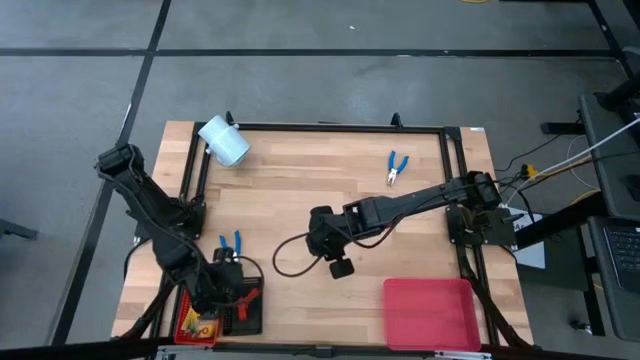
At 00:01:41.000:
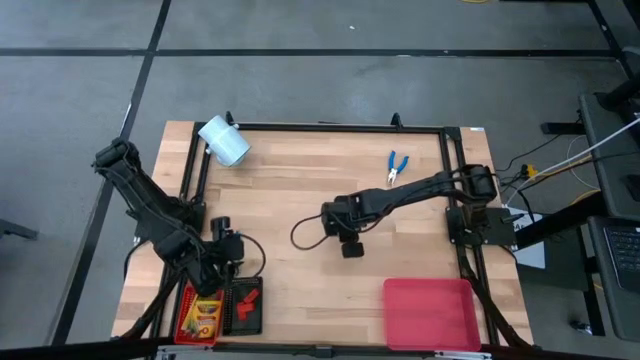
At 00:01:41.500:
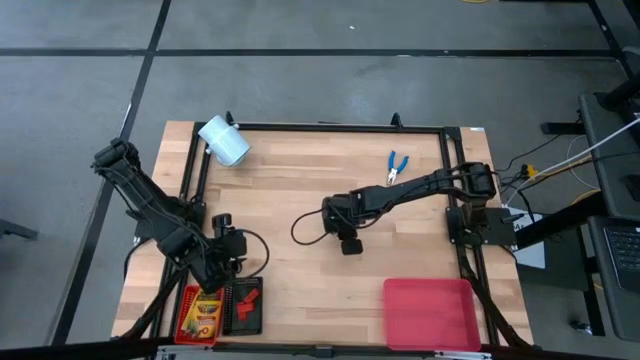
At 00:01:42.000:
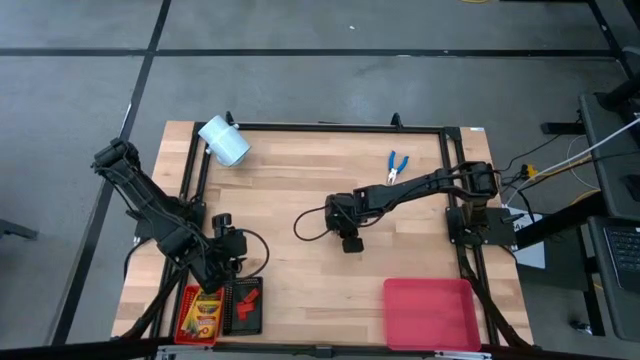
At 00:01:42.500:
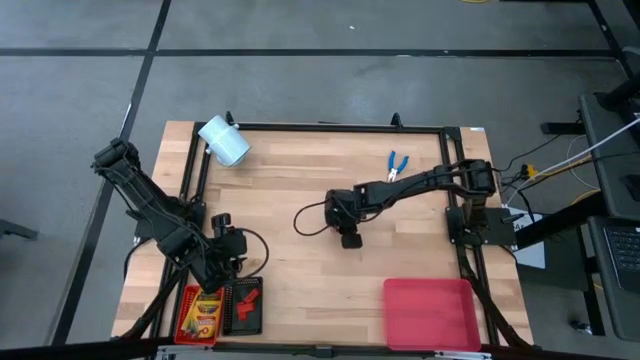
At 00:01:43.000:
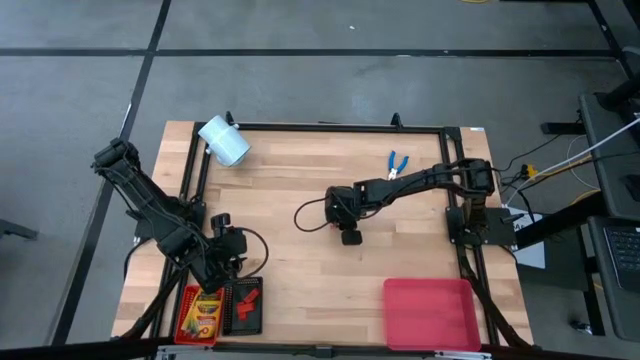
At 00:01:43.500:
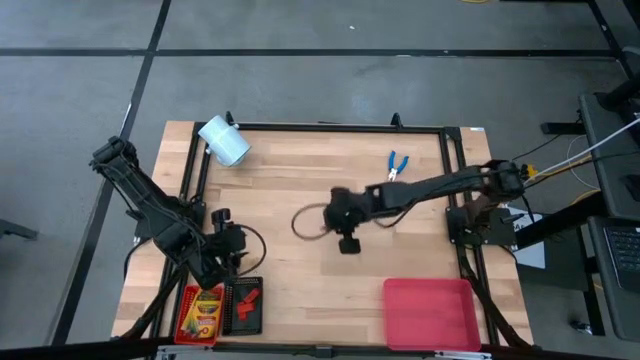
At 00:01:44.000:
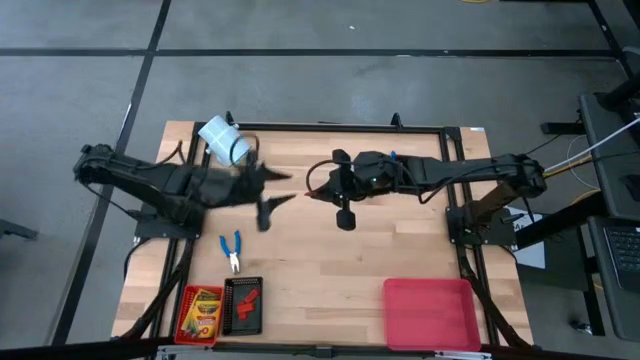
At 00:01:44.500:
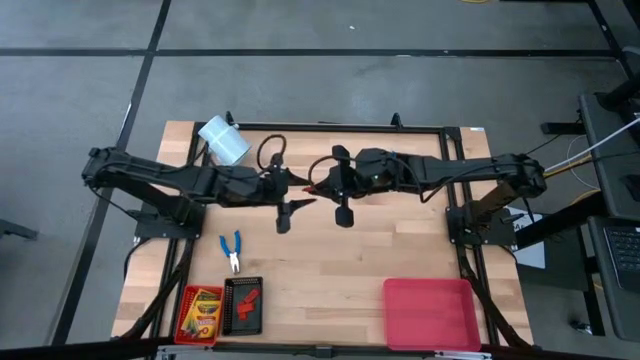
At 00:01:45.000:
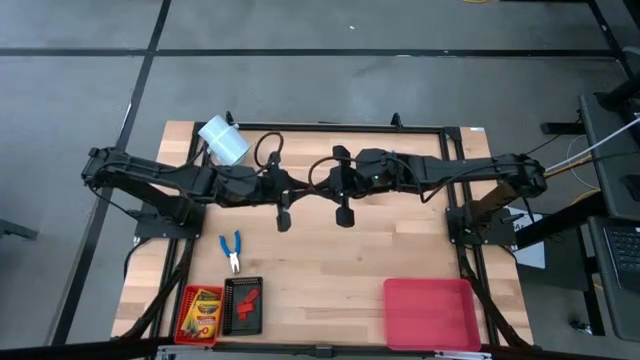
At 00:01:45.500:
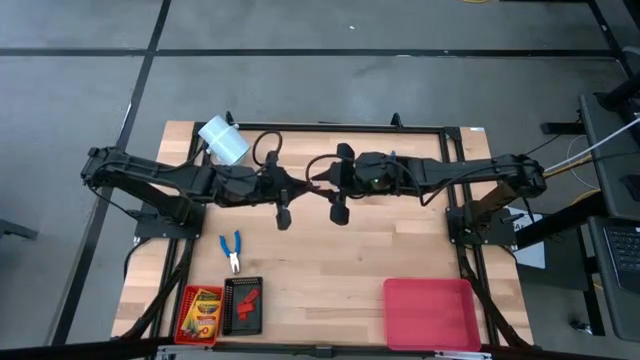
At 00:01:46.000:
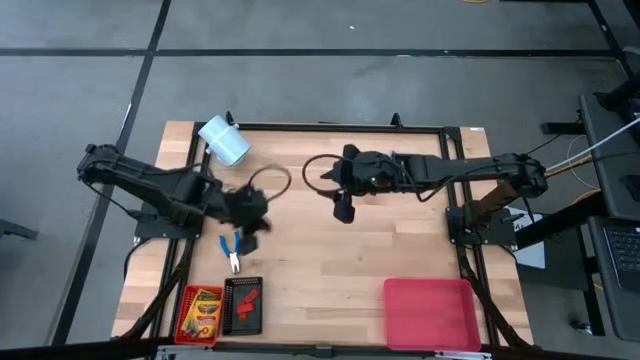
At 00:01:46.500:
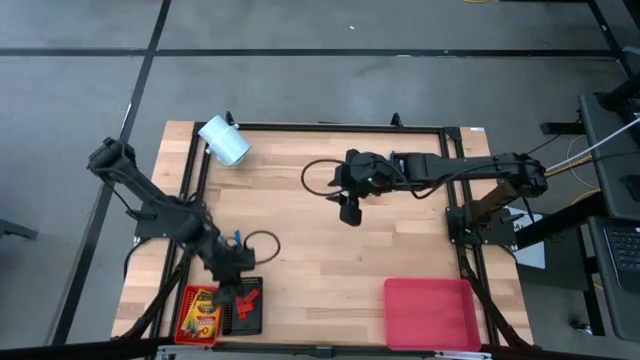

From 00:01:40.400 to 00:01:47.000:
Task: Pick & Place School Supplies
Put the red eraser into the black basket

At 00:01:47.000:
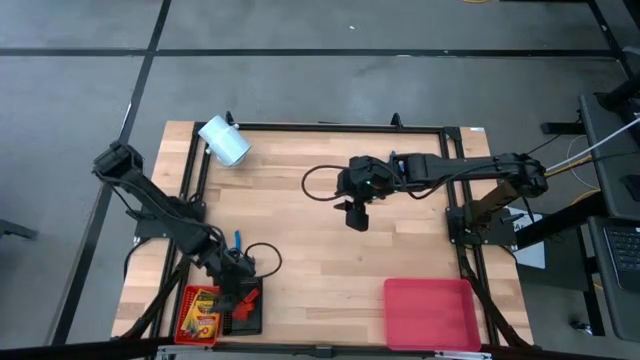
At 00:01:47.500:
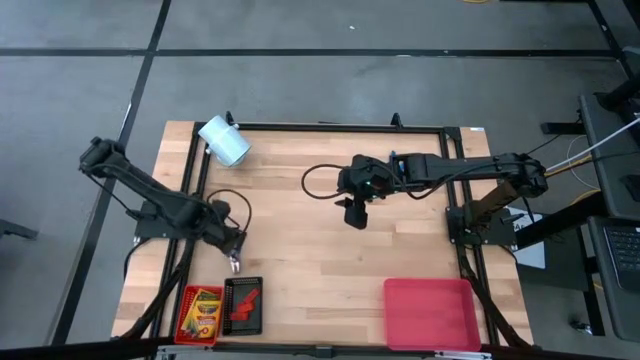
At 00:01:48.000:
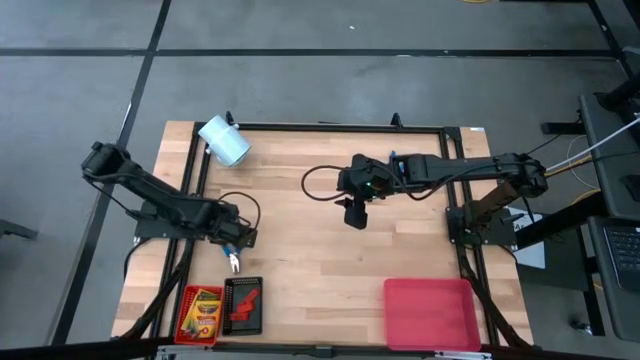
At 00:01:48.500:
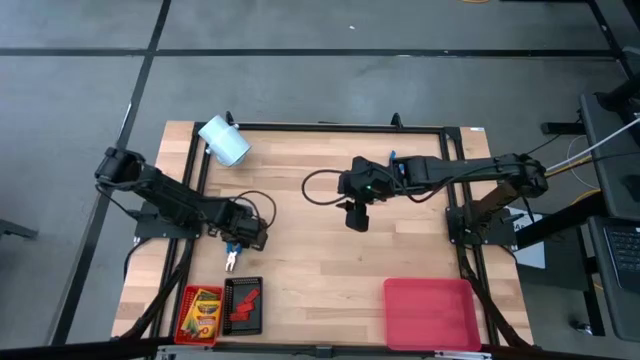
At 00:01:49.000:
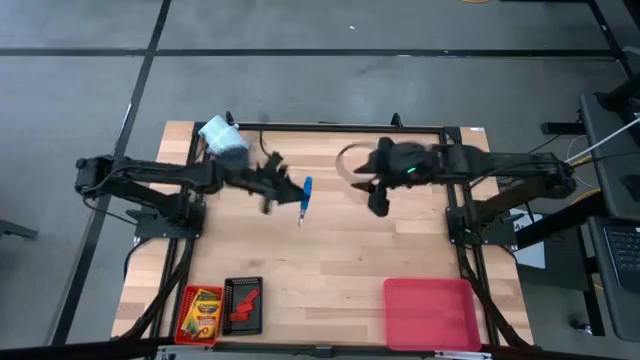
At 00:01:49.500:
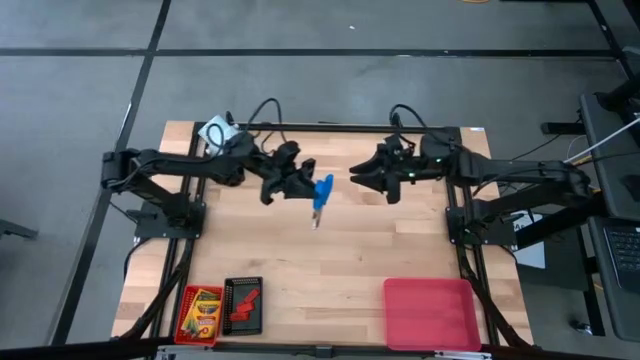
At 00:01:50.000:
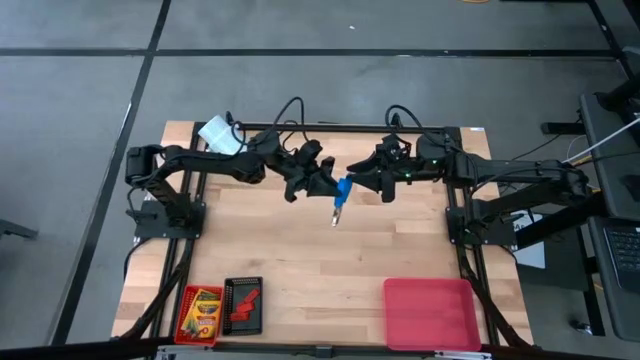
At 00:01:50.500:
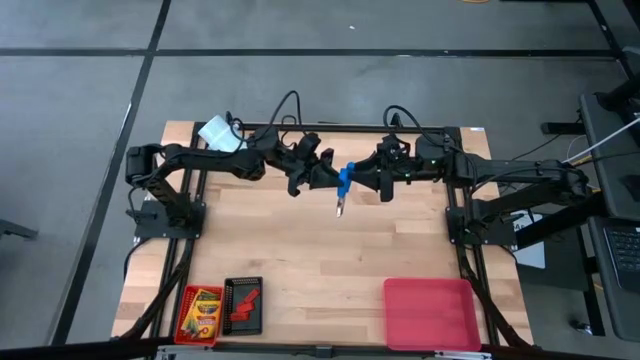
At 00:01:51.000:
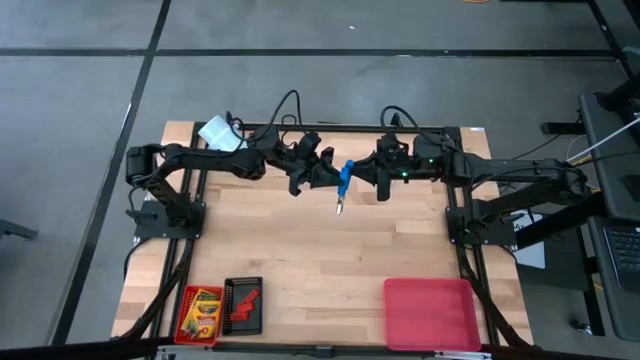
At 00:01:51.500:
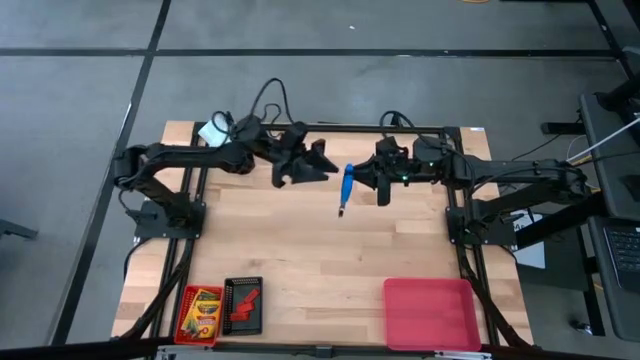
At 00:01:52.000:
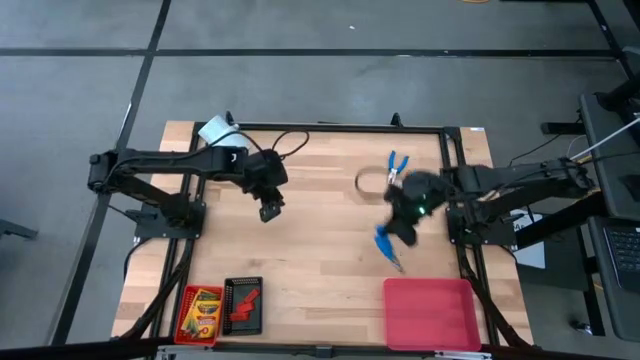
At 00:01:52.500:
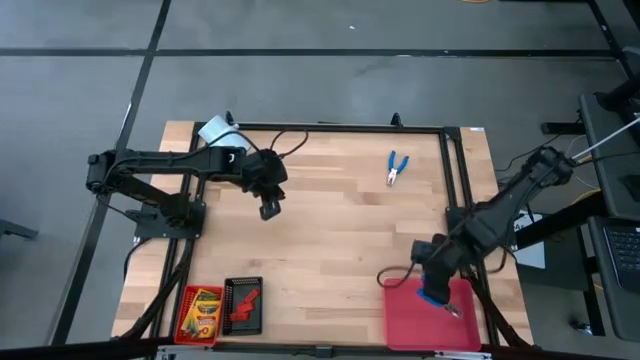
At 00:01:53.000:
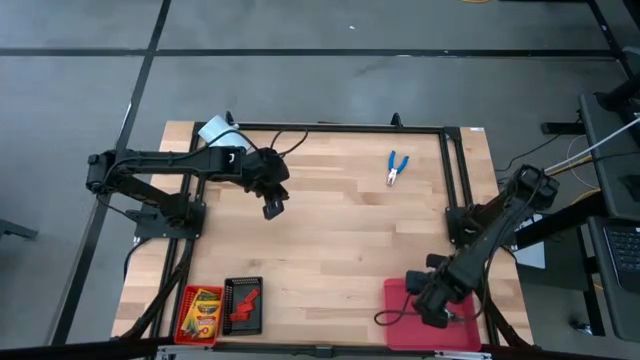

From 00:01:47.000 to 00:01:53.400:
Put the blue puncher into the red bin

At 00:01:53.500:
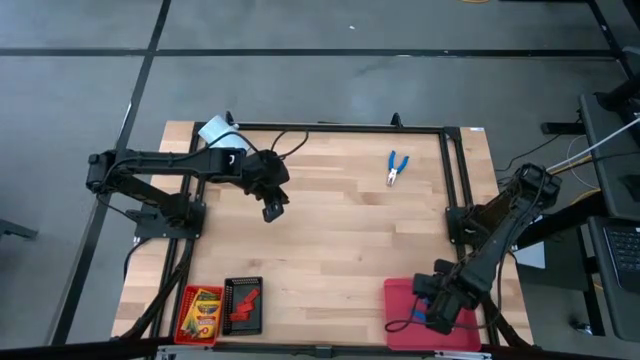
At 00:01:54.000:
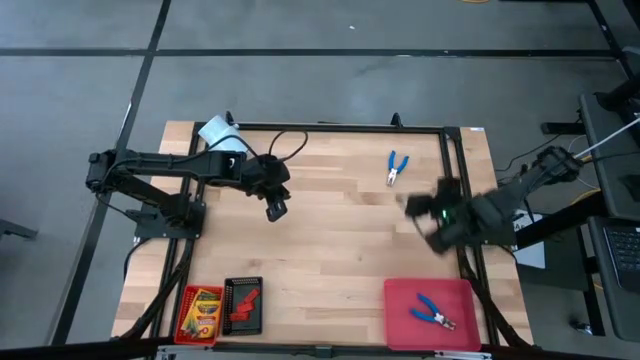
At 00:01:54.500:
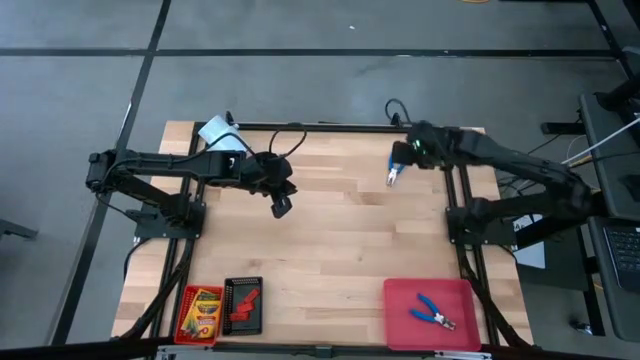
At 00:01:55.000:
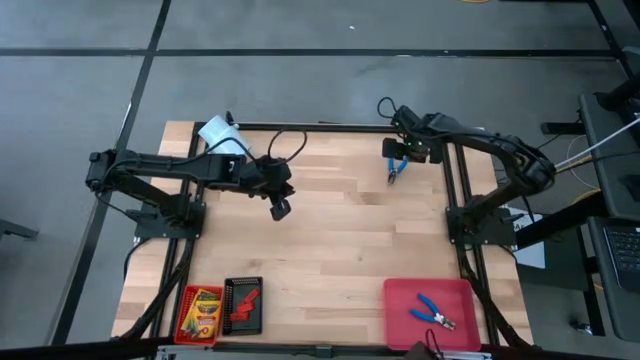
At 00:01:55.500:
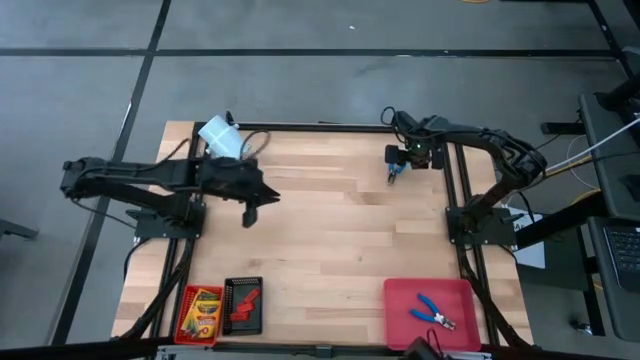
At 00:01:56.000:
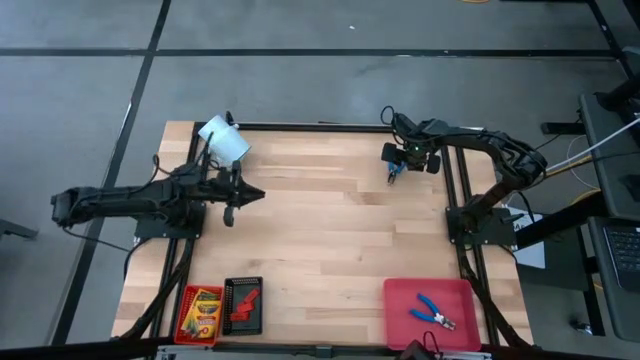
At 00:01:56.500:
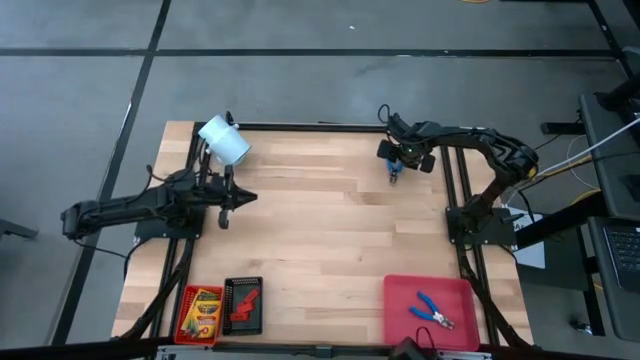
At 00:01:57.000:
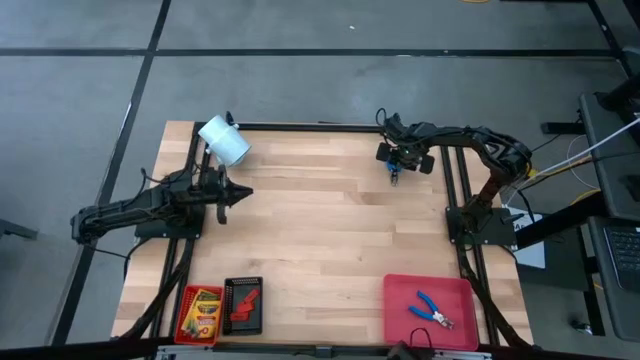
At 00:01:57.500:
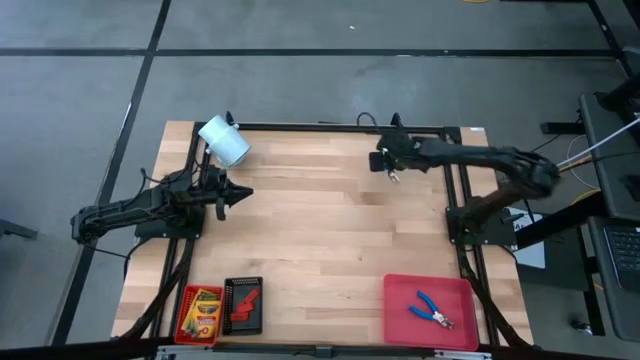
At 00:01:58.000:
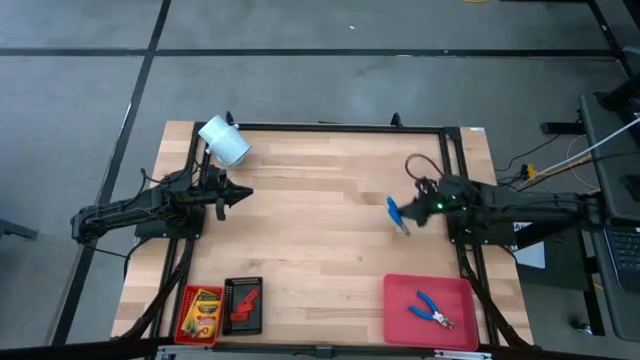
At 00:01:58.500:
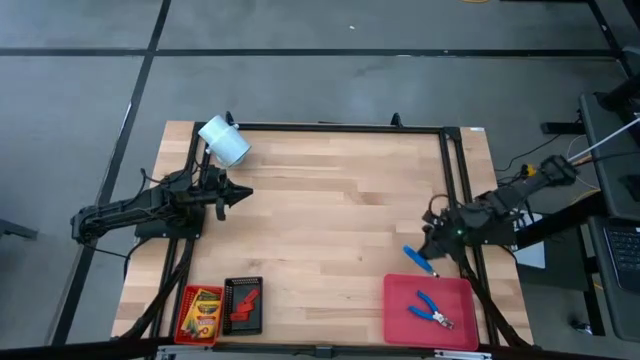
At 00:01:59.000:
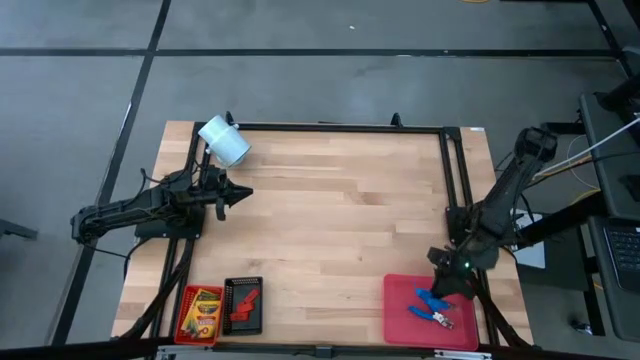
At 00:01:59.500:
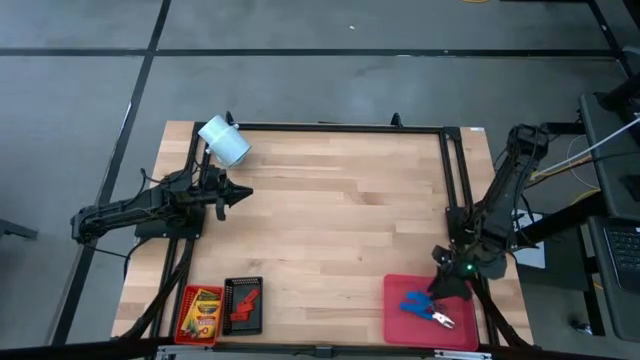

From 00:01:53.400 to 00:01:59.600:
Put the blue puncher into the red bin

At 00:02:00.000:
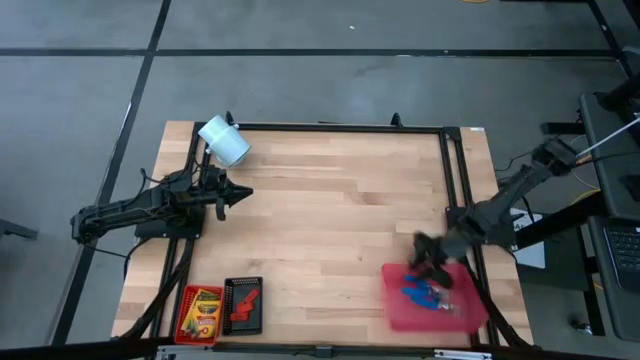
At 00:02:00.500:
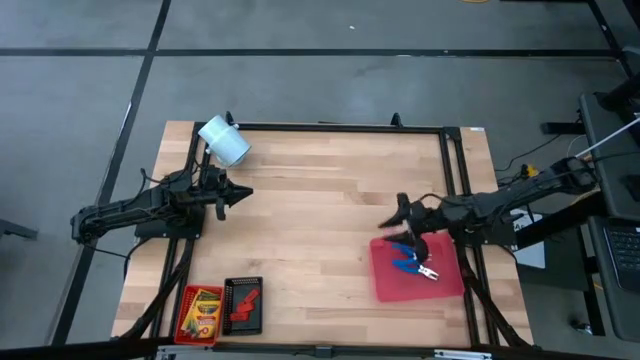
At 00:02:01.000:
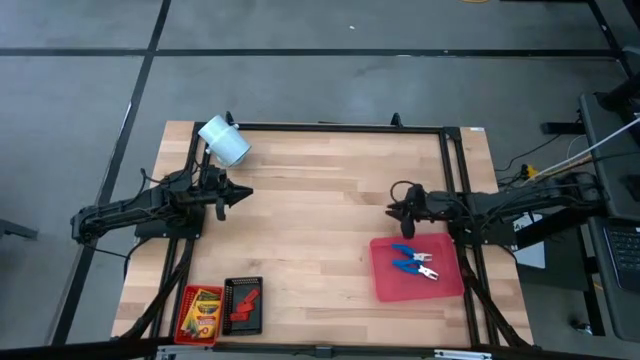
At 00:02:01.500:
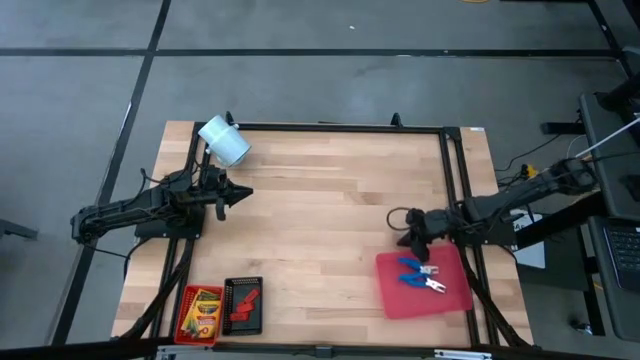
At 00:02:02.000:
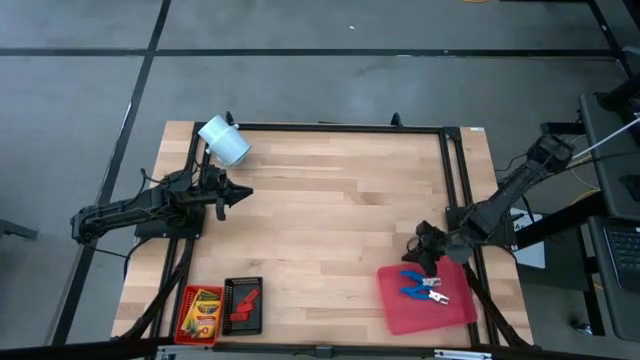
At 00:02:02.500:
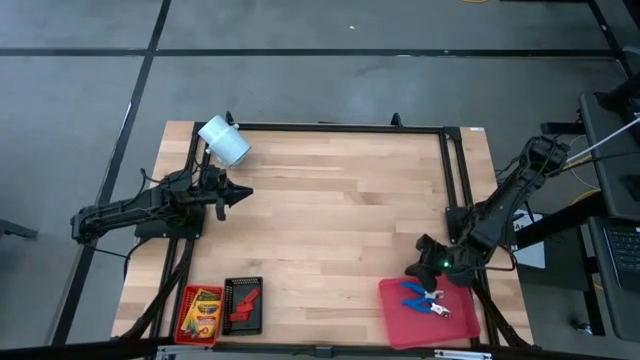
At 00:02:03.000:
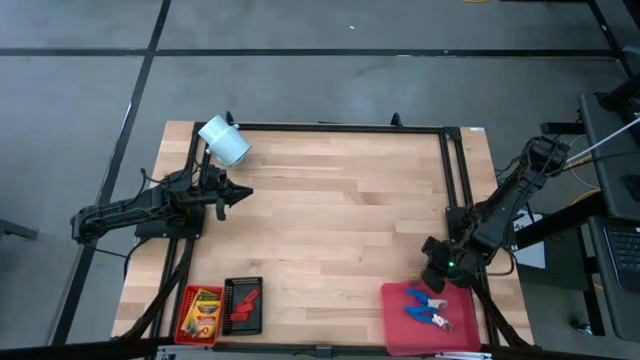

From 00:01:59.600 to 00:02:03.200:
Adjust the red bin on the table
